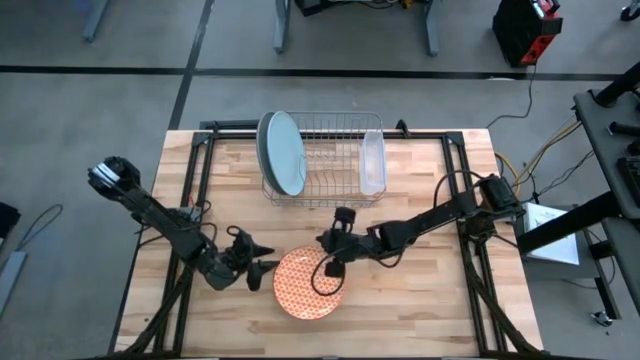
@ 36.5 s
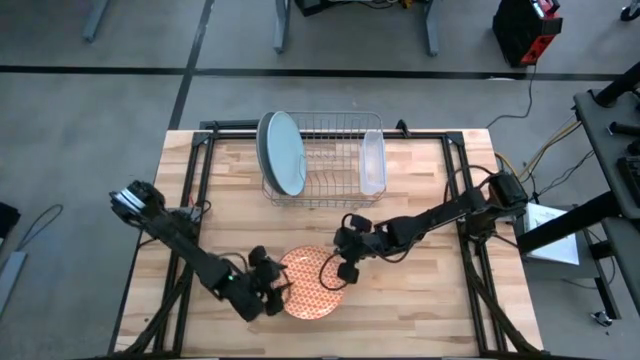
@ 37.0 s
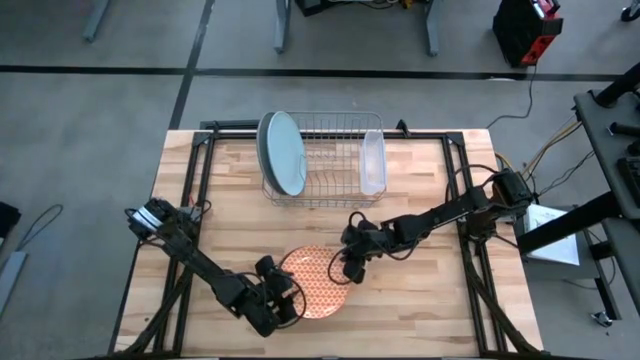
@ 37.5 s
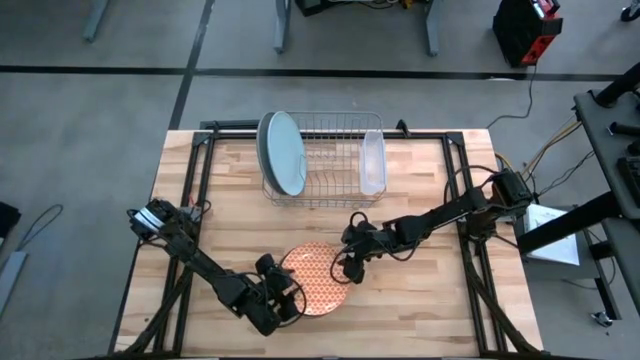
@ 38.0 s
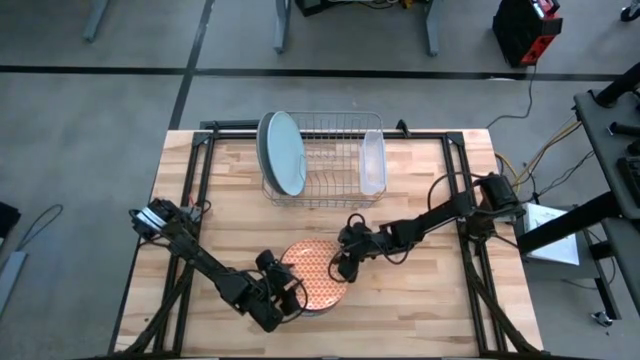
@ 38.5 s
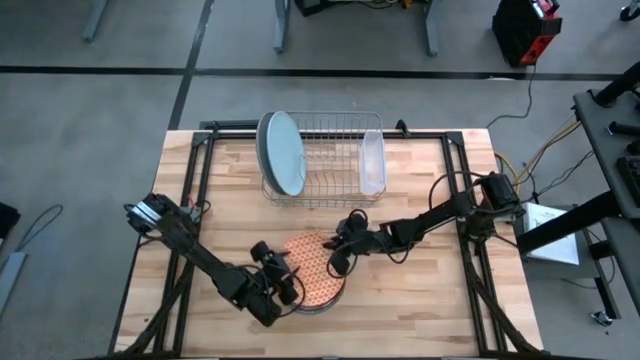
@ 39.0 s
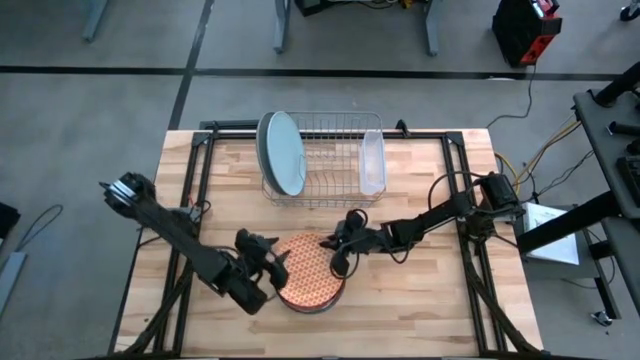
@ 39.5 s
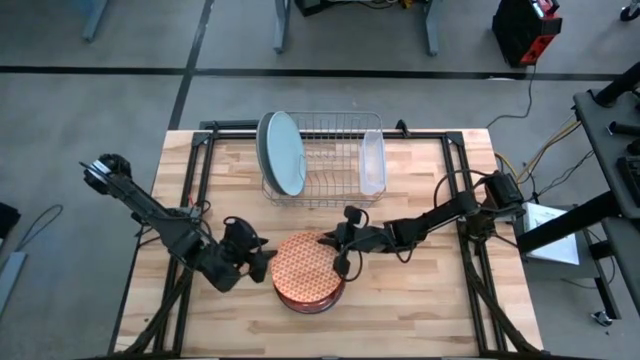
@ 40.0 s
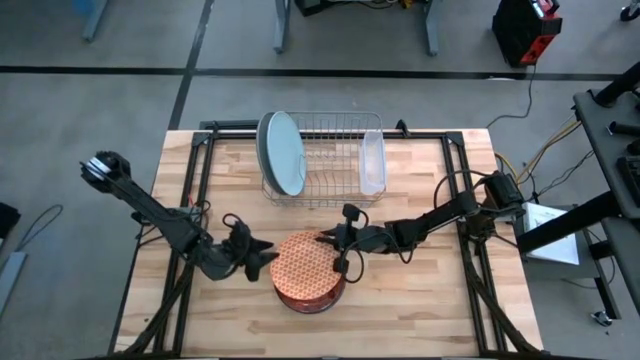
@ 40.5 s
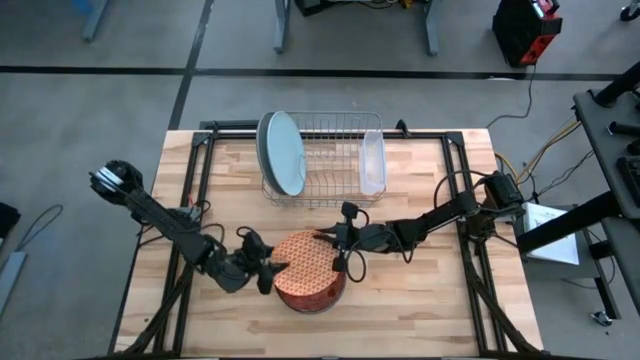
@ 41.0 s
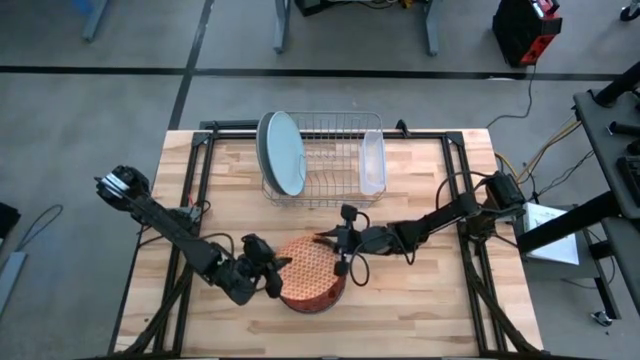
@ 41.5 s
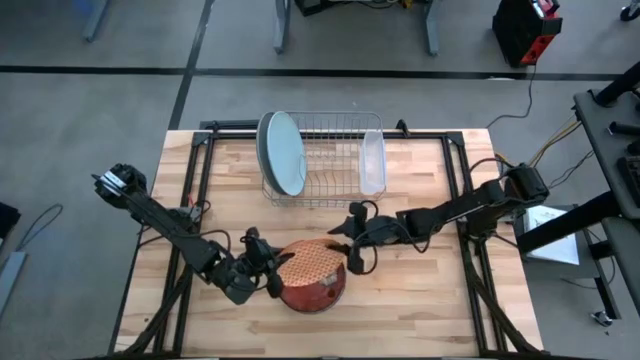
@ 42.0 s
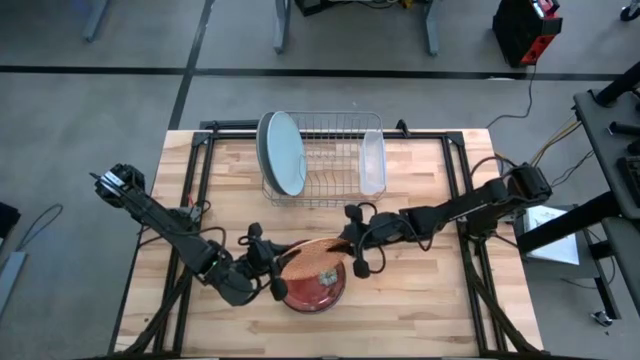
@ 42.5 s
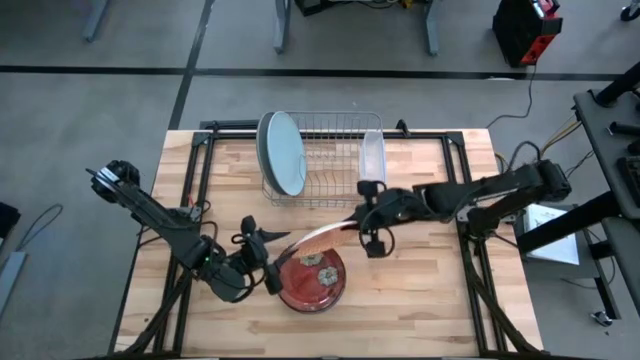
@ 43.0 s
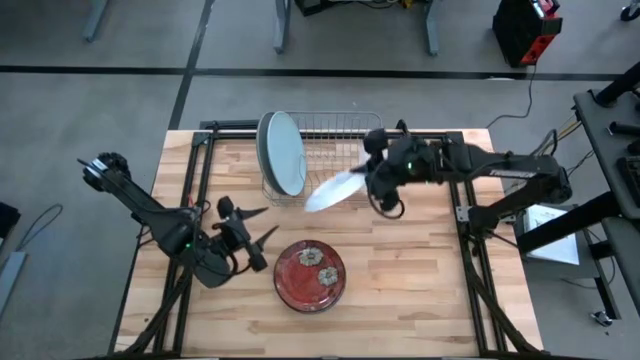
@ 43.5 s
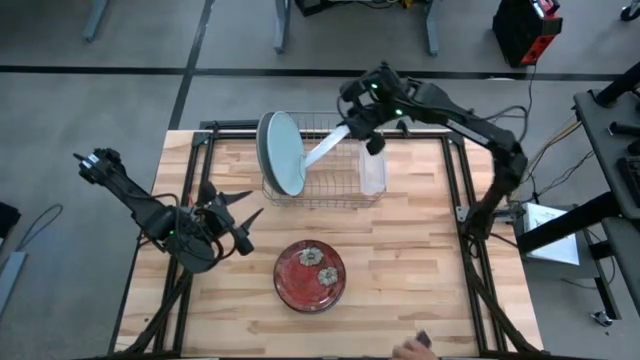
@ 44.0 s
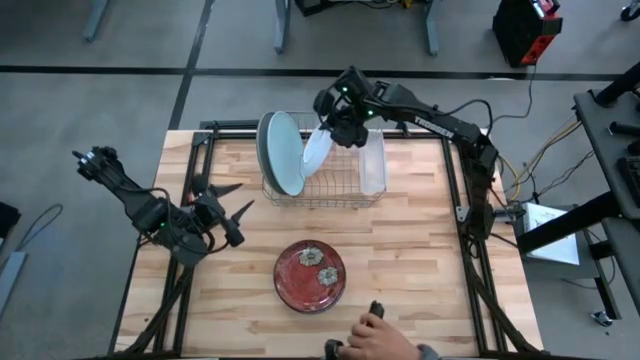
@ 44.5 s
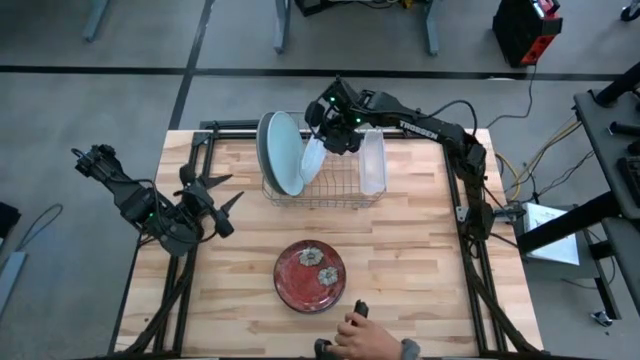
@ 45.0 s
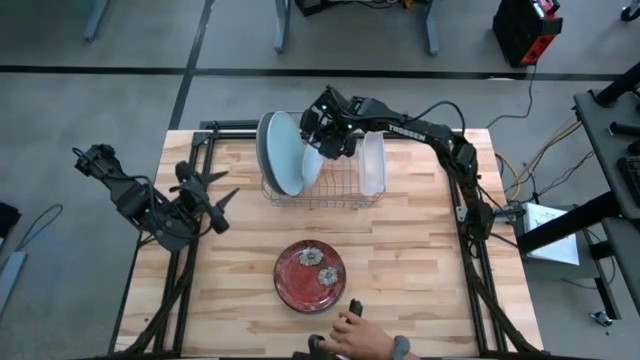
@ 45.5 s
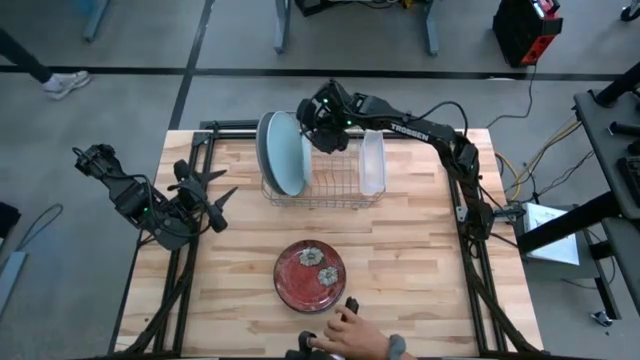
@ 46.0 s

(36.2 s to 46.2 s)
Task: Sort dishes
Put the orange plate in the dish rack

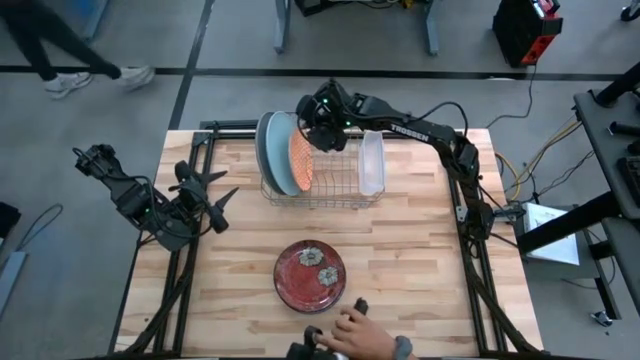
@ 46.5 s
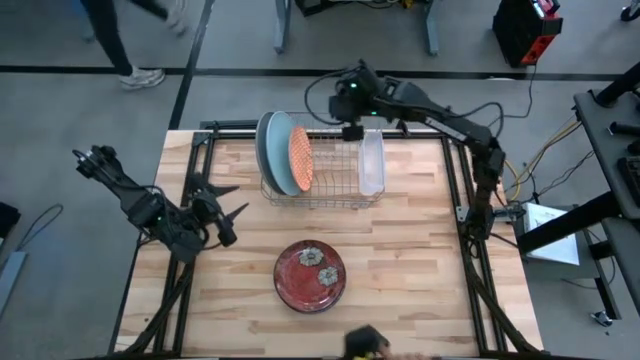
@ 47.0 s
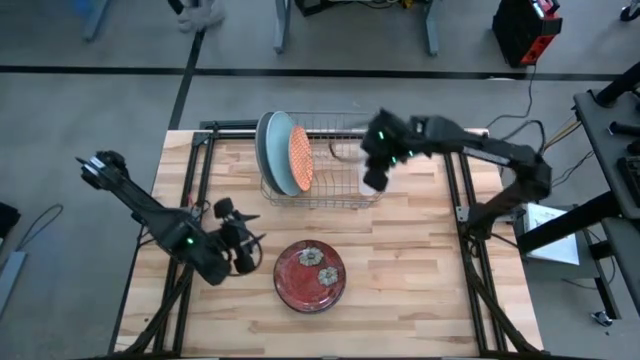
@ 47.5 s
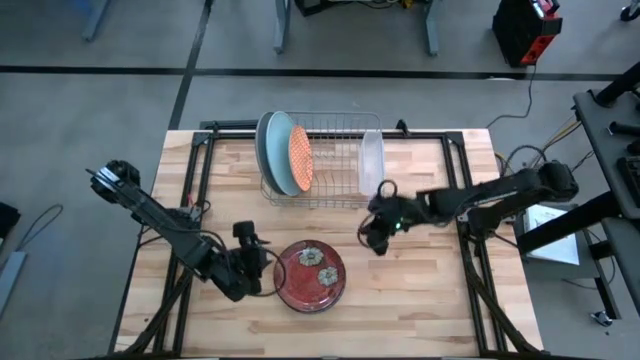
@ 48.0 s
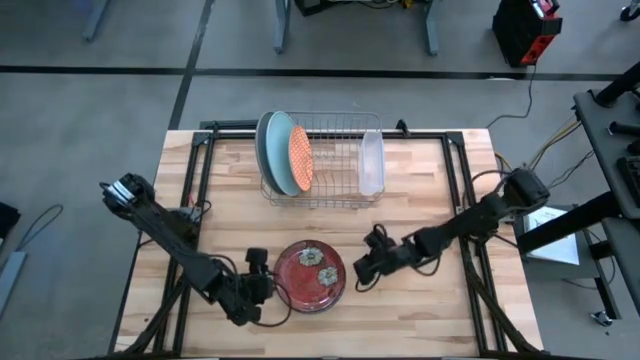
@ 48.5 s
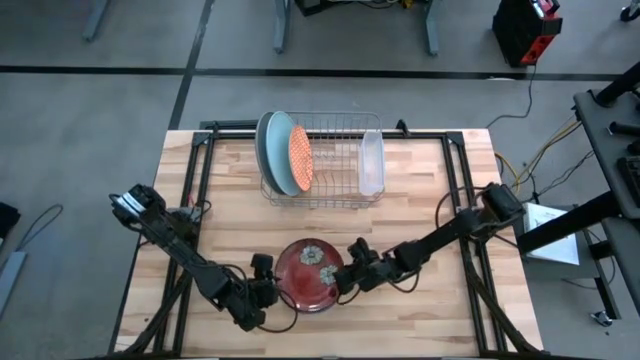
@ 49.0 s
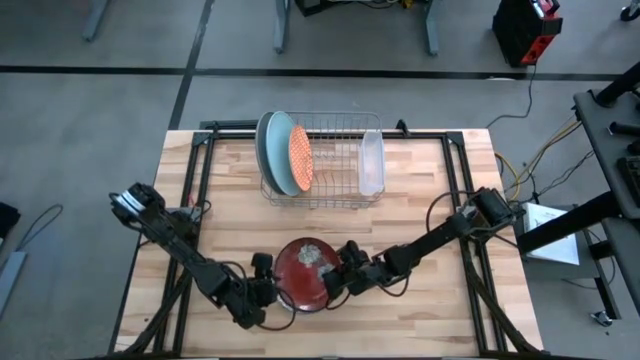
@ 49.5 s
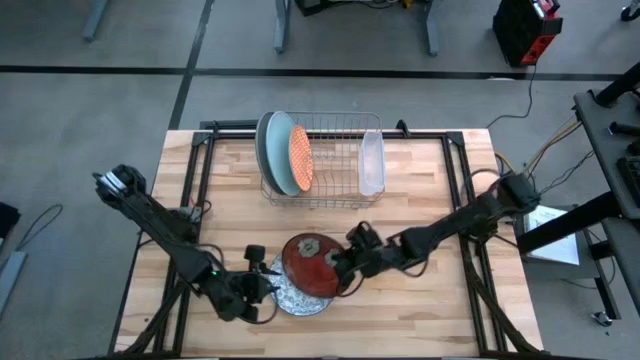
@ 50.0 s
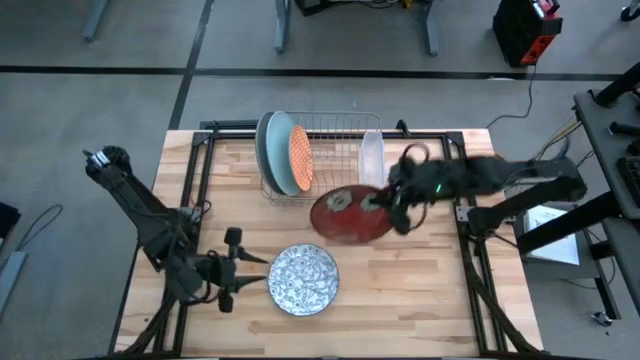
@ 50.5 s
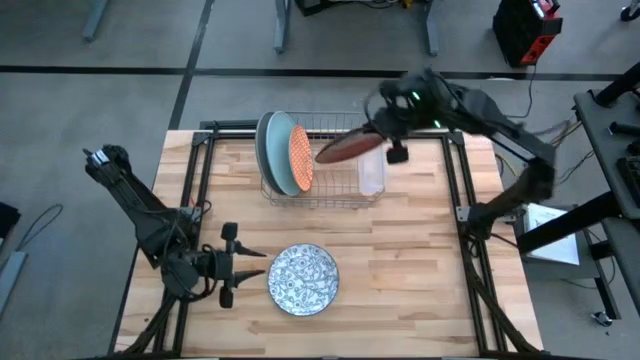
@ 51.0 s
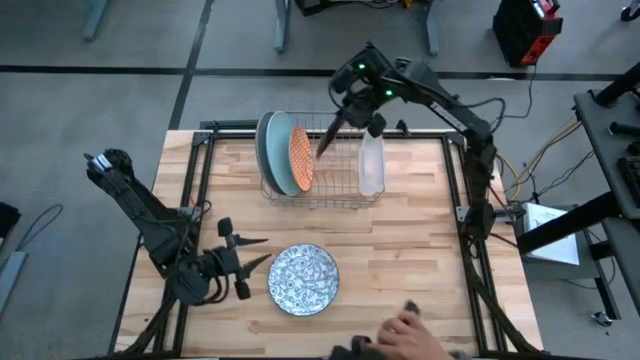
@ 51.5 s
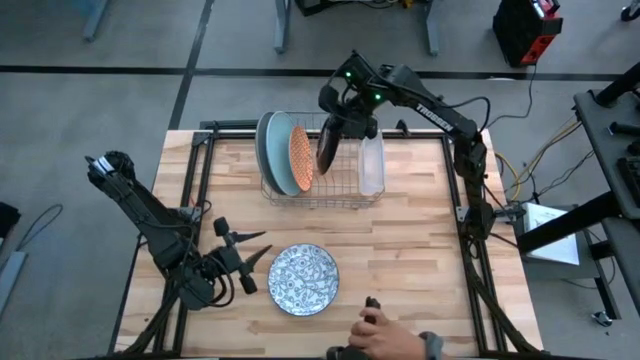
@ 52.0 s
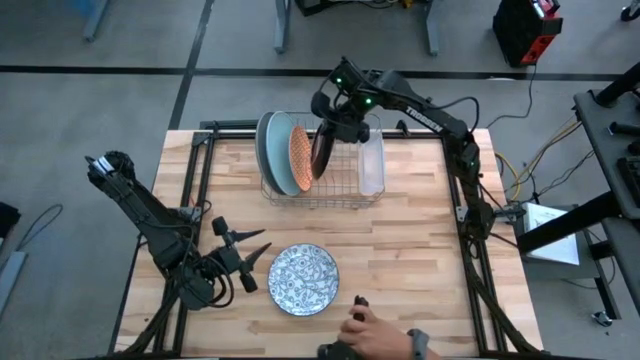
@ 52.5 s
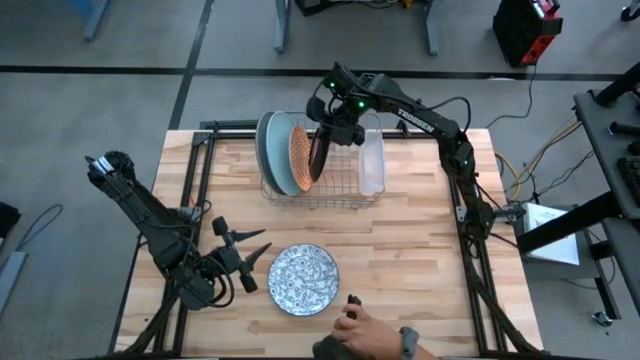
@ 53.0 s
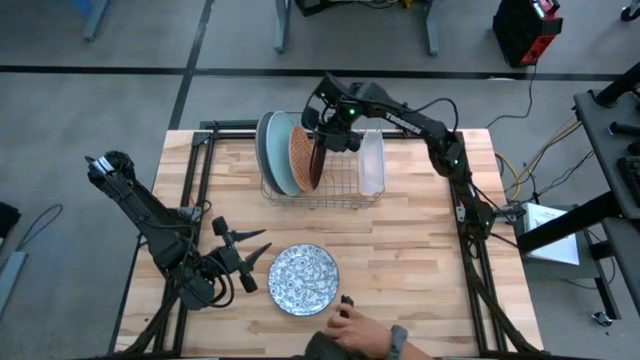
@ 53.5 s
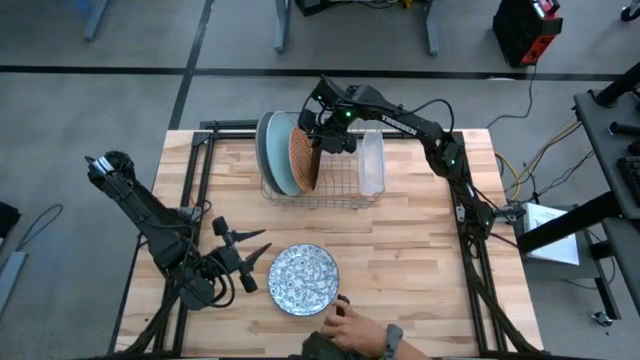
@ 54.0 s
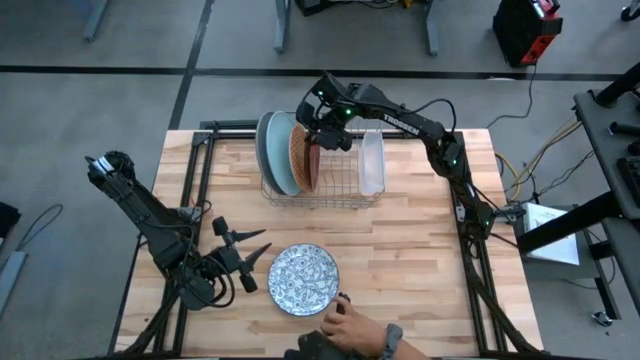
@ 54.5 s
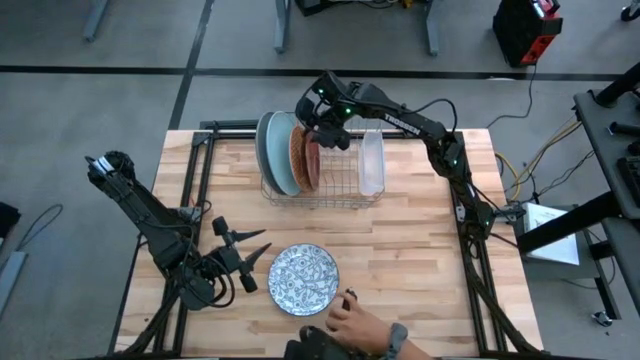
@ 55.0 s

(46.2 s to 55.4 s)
Put the red plate in the dish rack
